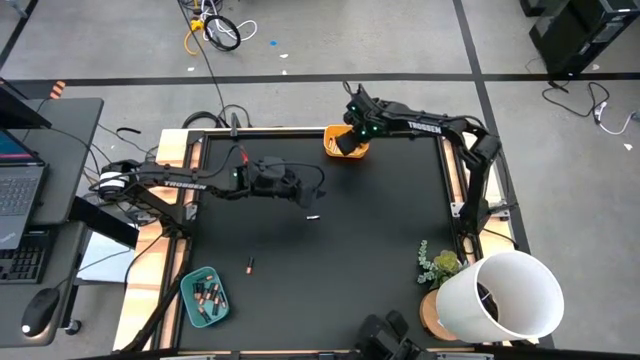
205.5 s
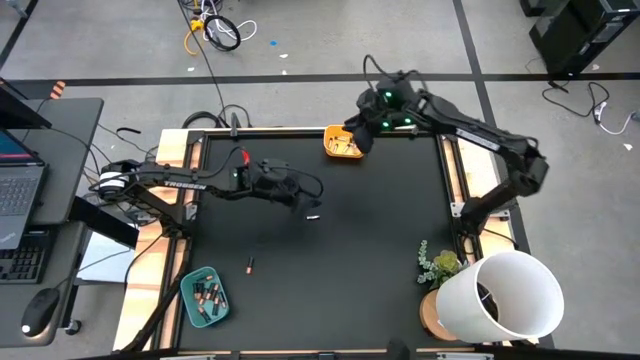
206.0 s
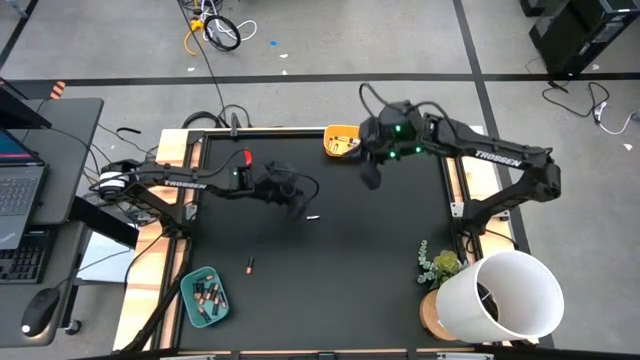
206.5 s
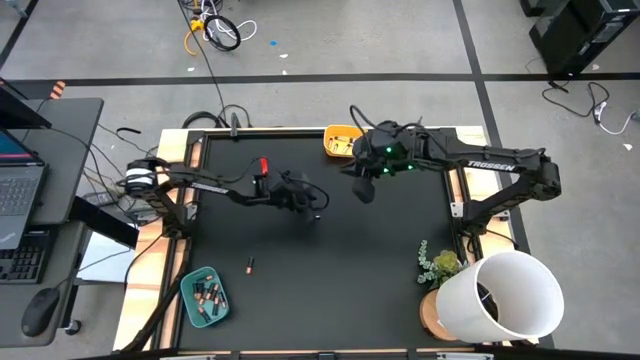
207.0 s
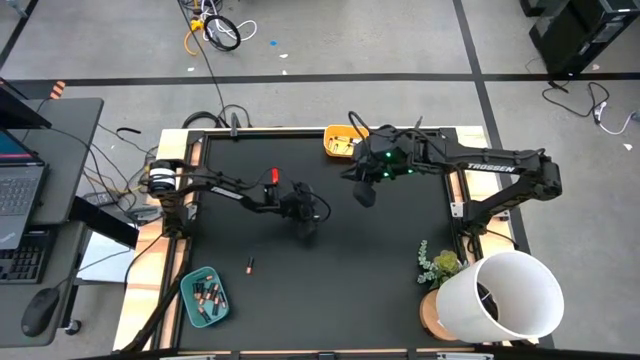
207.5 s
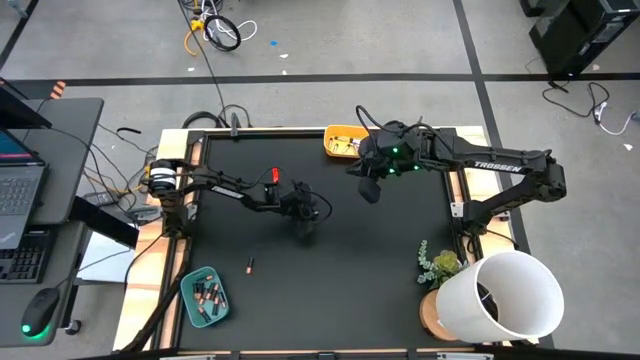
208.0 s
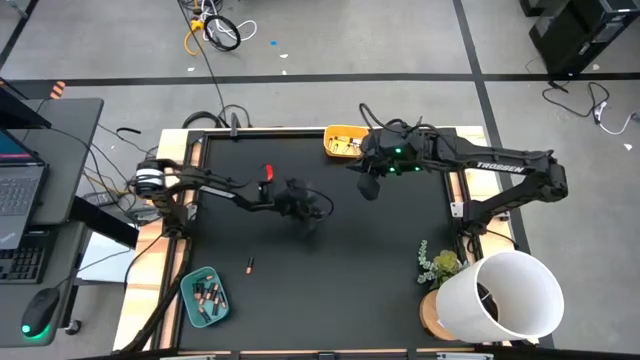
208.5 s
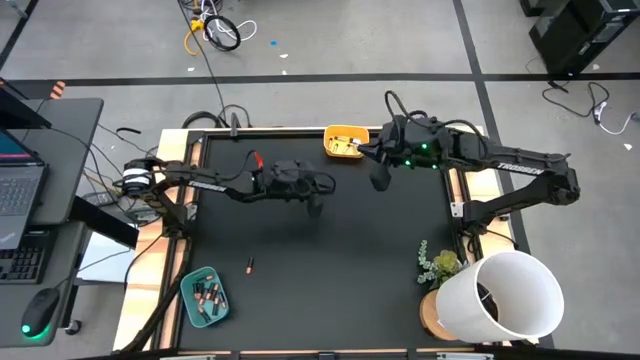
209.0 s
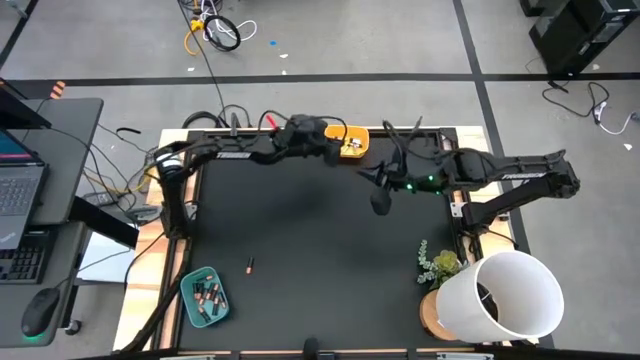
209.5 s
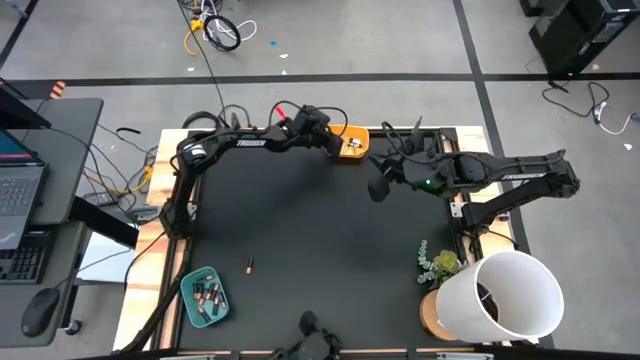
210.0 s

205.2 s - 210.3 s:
Task: Sort batteries
Put the silver battery into the yellow bin

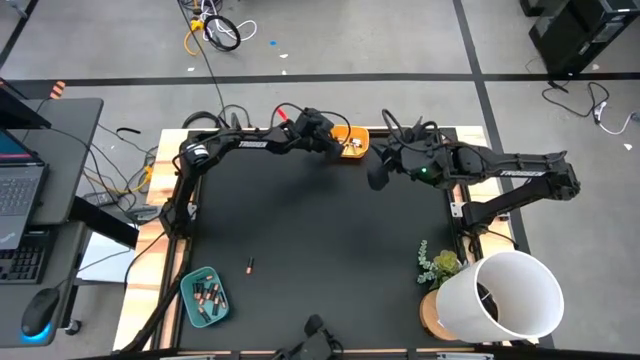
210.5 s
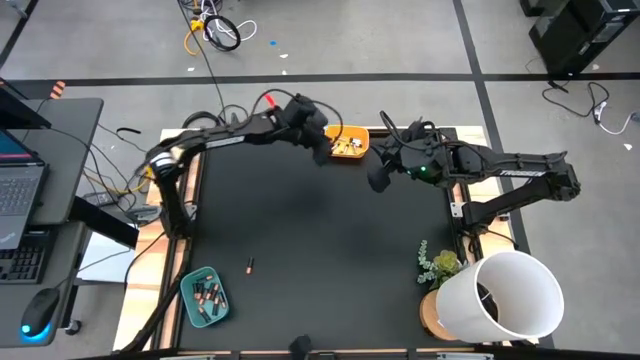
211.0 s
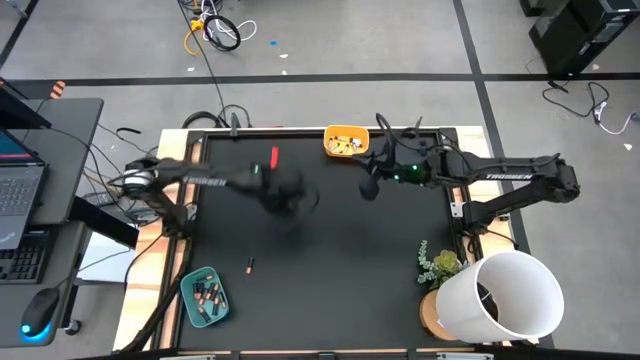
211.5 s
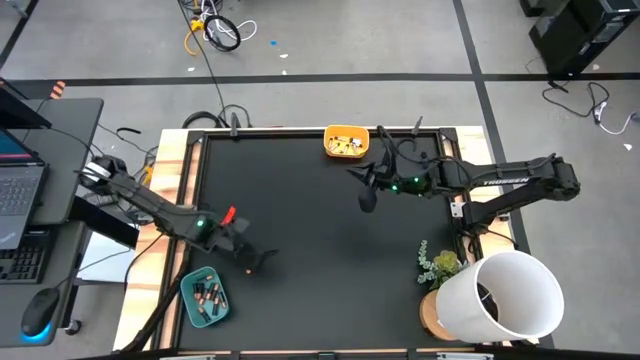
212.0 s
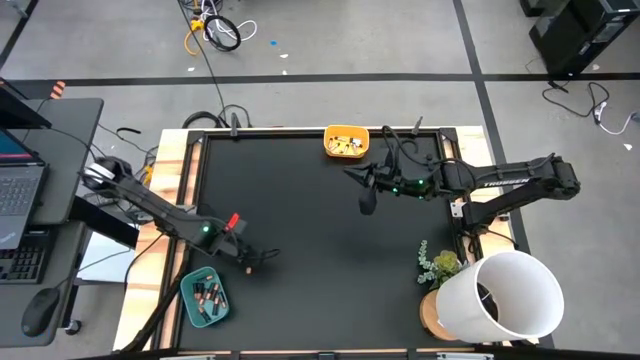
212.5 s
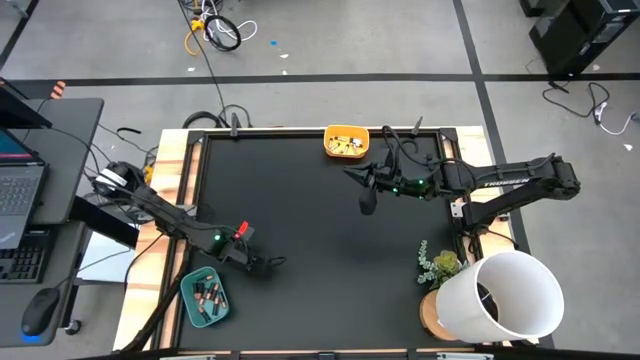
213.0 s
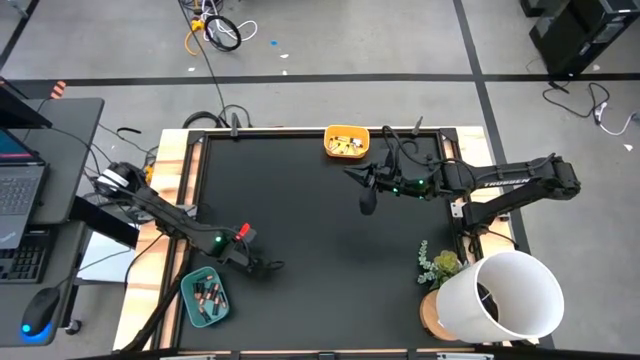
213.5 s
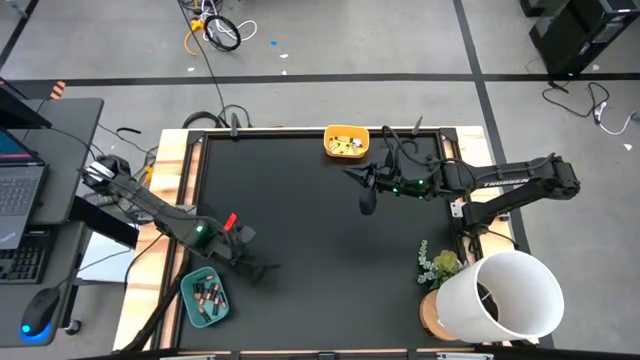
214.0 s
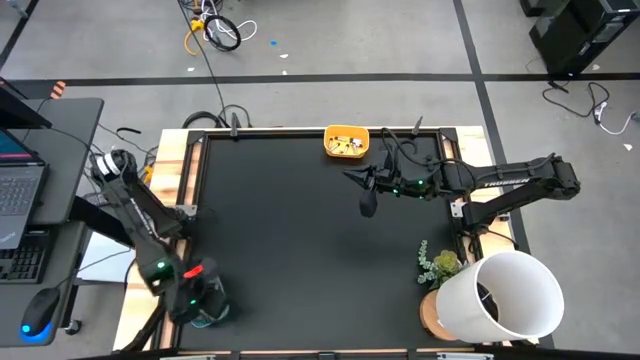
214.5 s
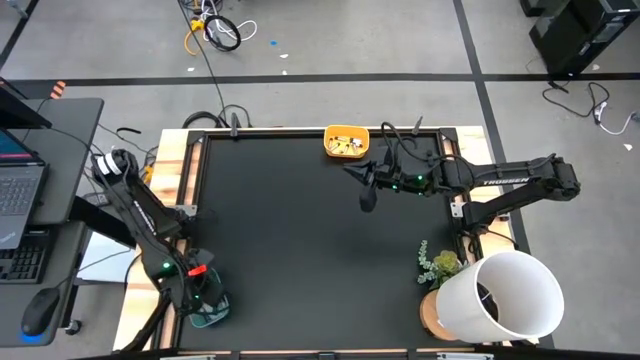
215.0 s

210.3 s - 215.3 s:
Put the black battery into the green bin

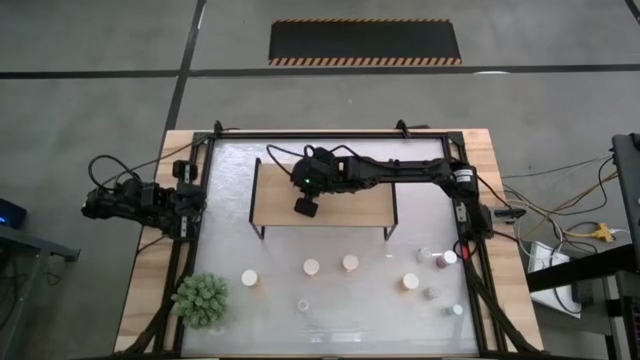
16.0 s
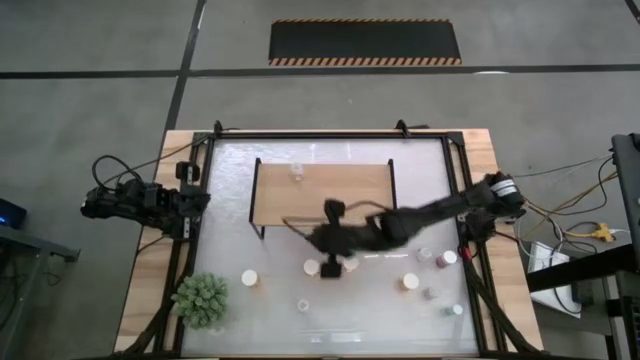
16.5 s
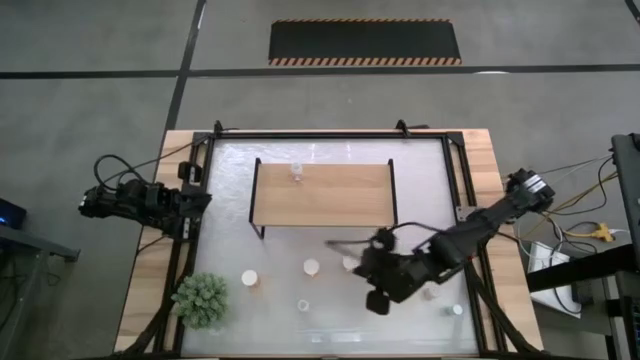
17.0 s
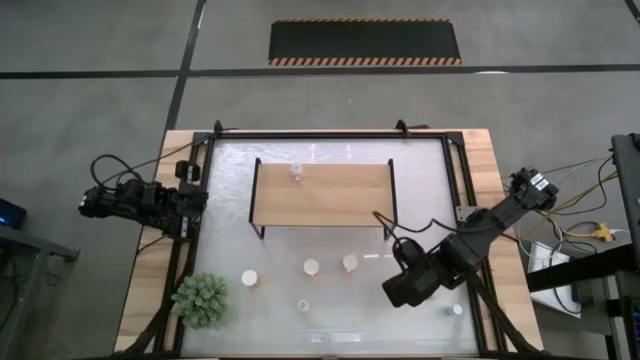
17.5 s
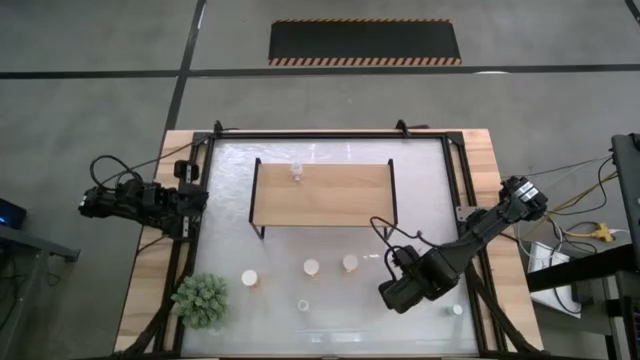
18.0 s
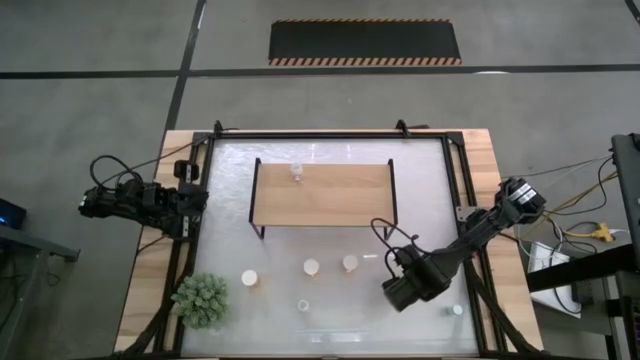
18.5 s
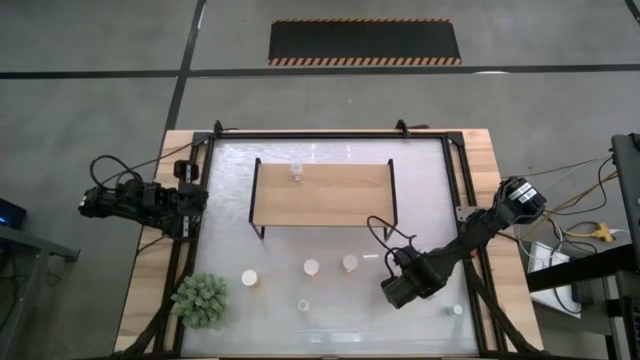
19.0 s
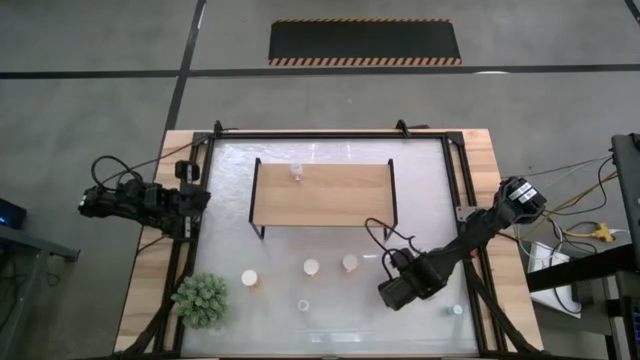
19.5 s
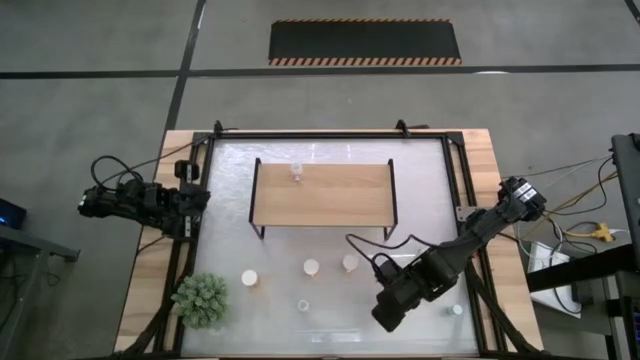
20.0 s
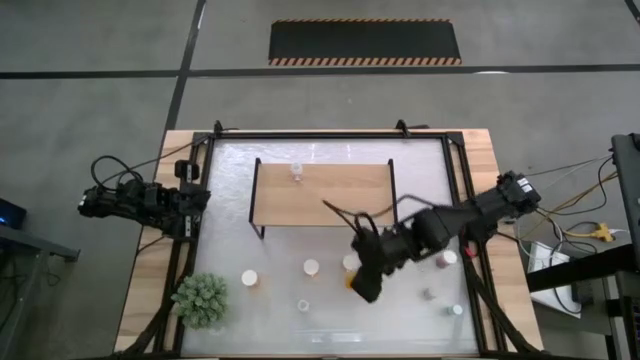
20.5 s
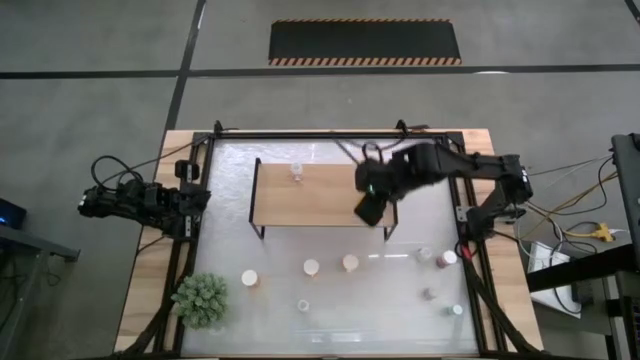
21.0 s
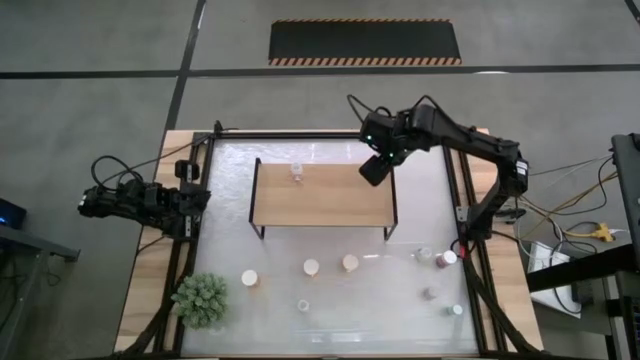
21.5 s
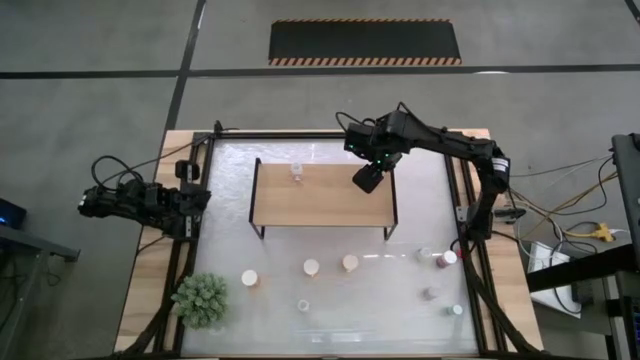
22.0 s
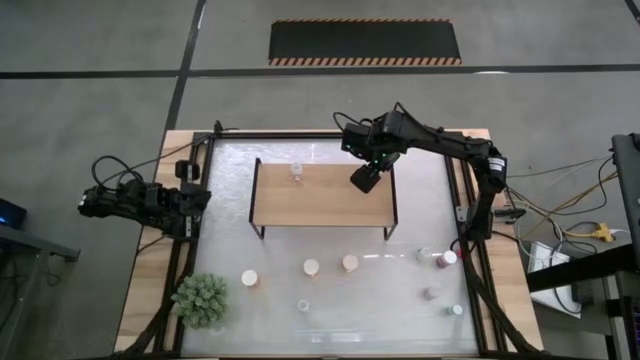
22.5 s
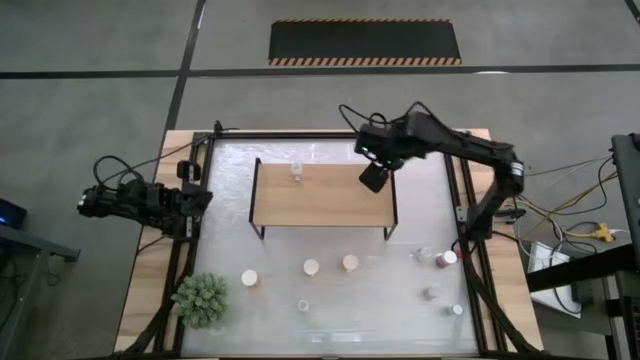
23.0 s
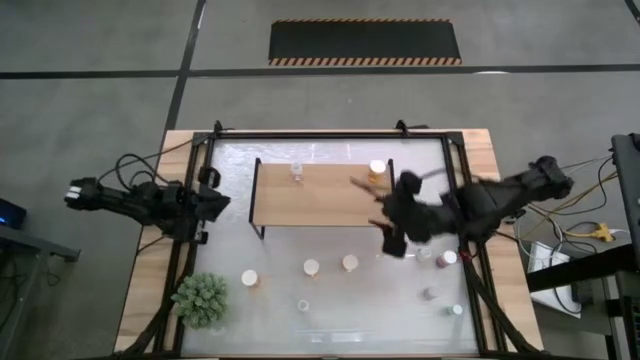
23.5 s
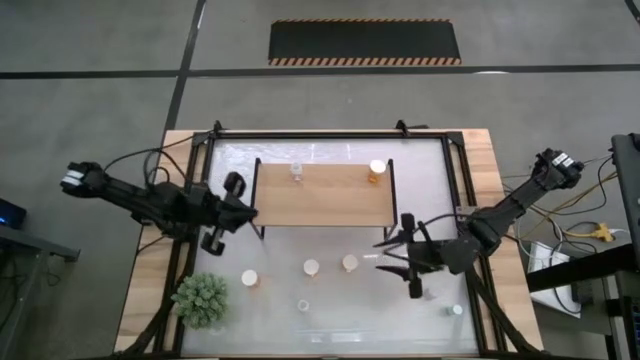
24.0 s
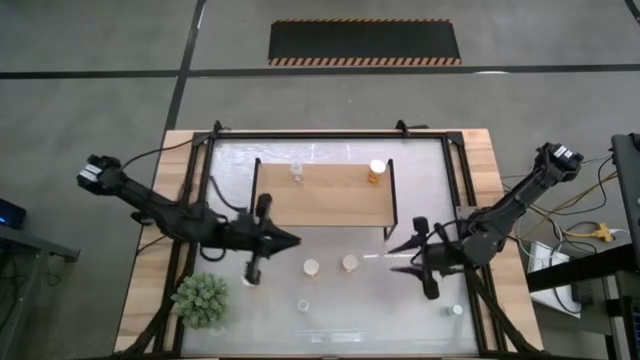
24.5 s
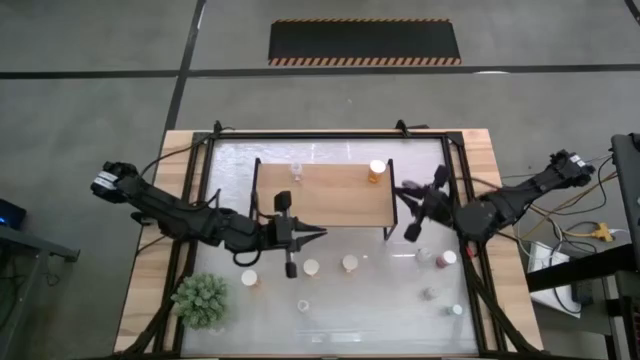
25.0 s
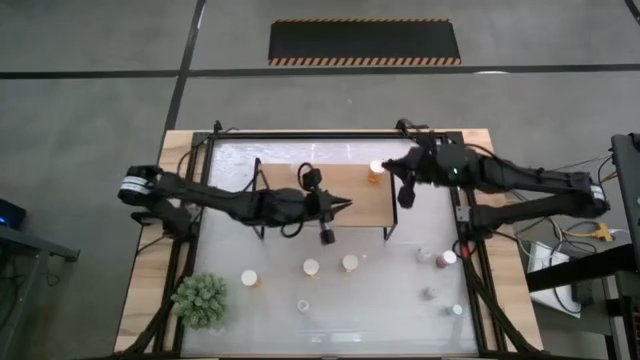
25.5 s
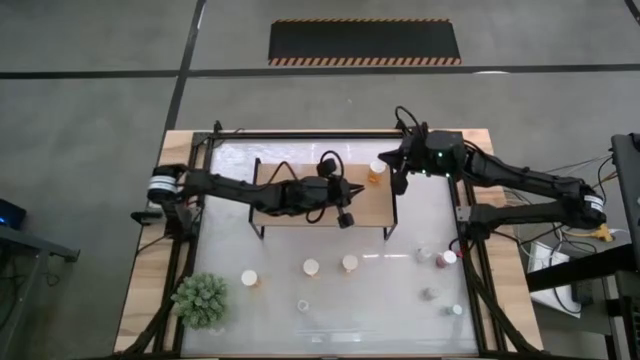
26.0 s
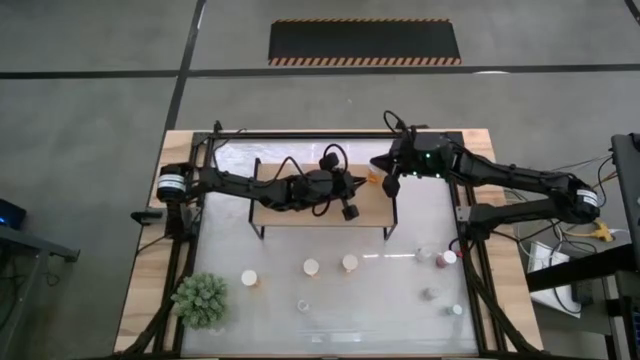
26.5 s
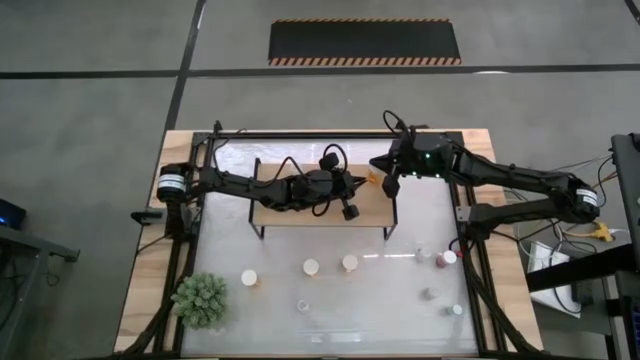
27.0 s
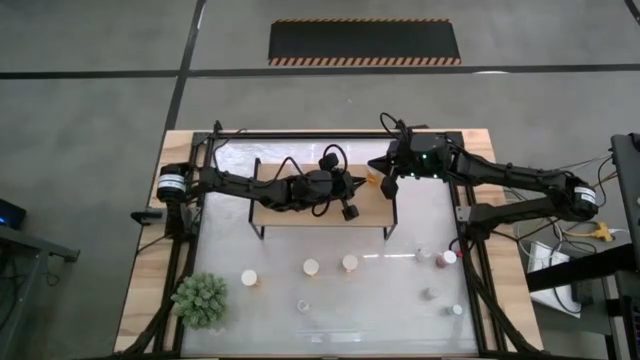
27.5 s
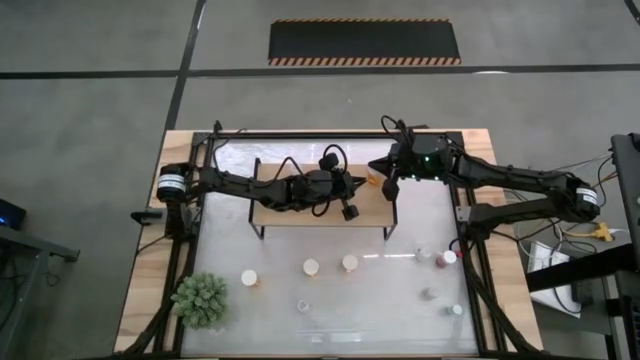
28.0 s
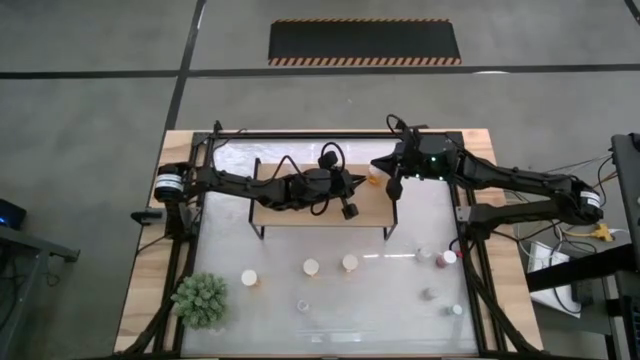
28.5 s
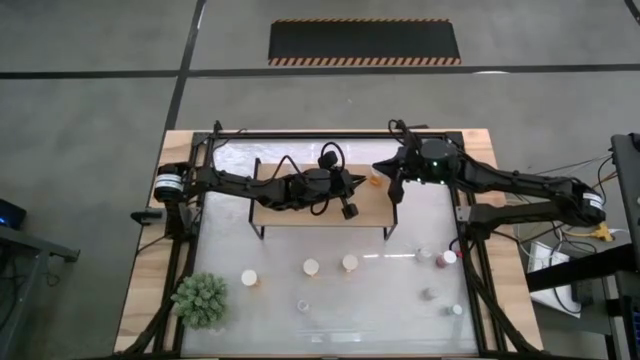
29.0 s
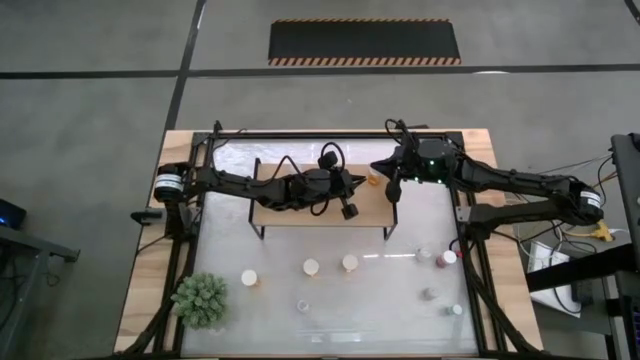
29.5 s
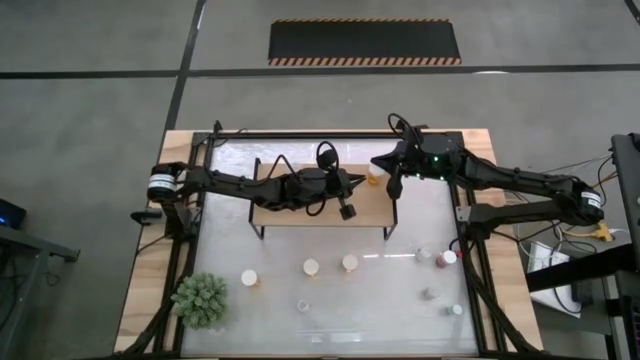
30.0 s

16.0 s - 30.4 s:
Task: Pick and place medicine bottles onto shelf by color
Put the orange pill bottle on the shelf
